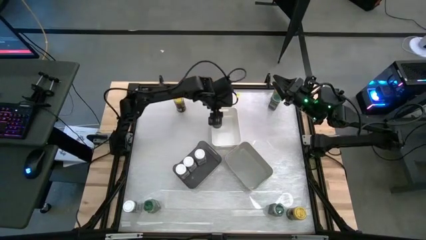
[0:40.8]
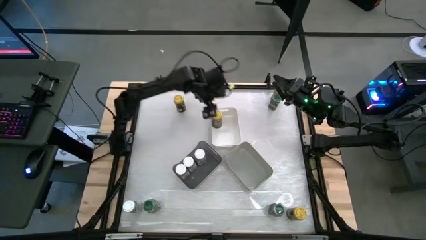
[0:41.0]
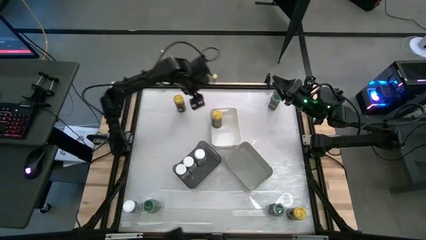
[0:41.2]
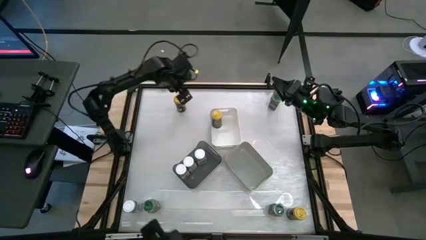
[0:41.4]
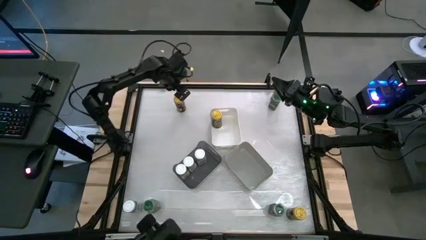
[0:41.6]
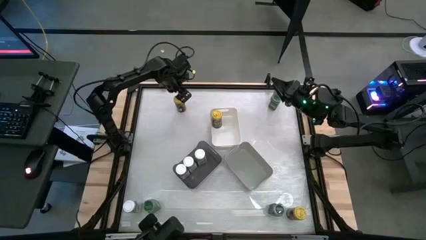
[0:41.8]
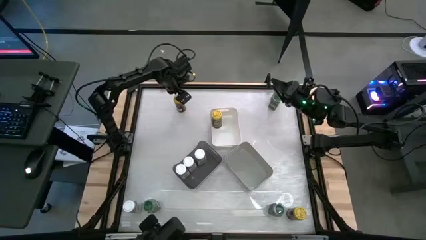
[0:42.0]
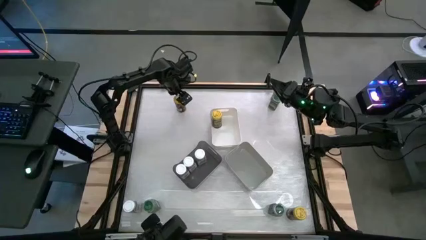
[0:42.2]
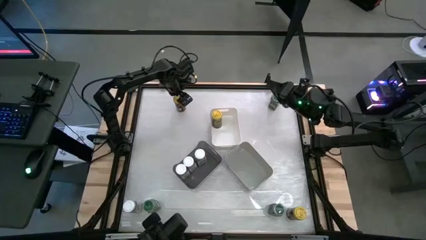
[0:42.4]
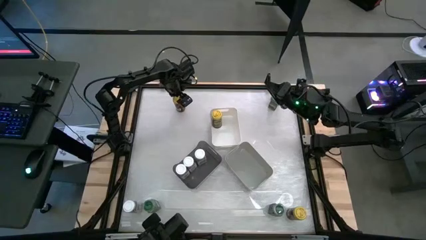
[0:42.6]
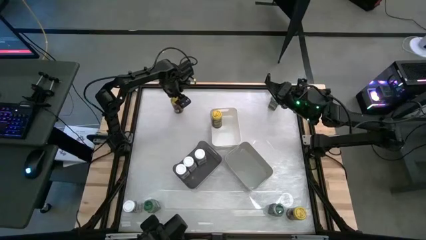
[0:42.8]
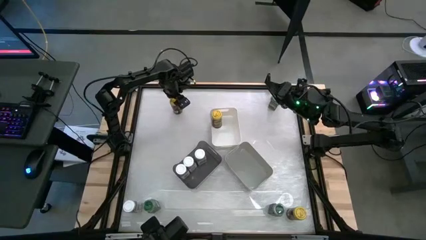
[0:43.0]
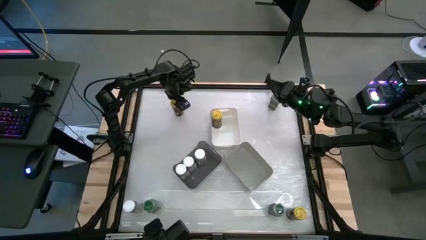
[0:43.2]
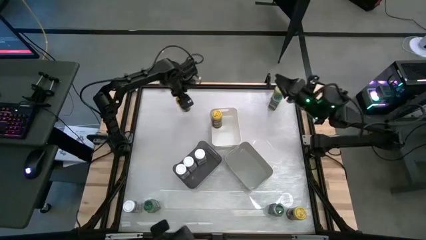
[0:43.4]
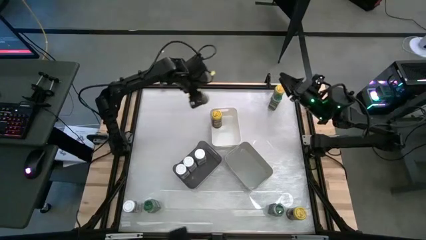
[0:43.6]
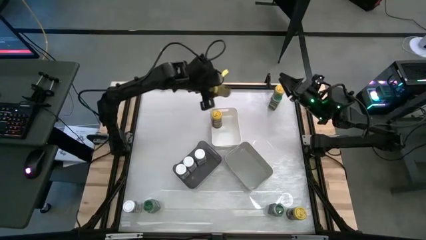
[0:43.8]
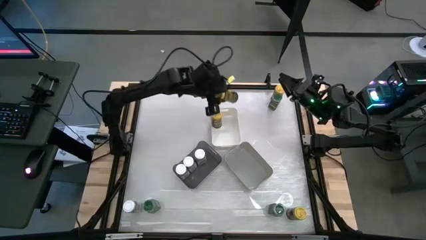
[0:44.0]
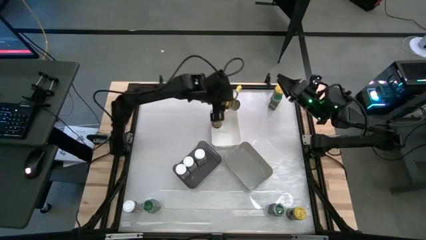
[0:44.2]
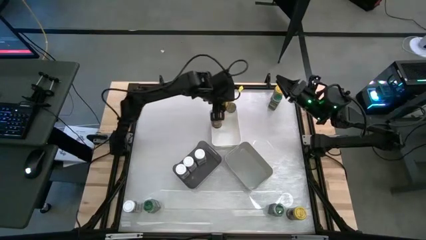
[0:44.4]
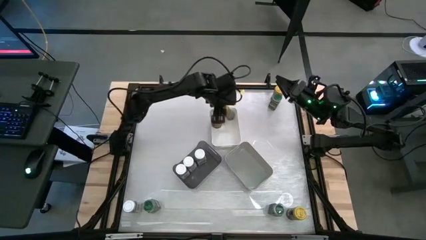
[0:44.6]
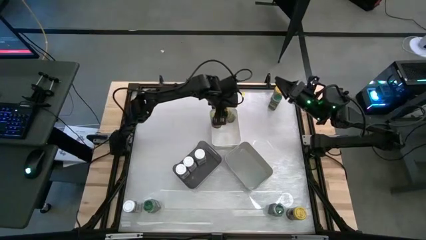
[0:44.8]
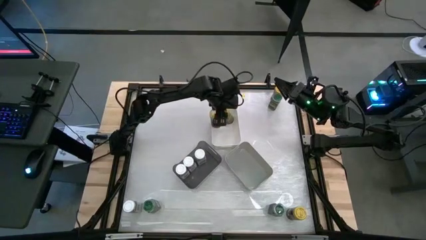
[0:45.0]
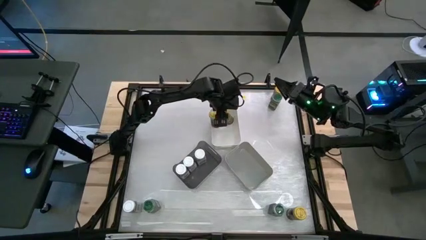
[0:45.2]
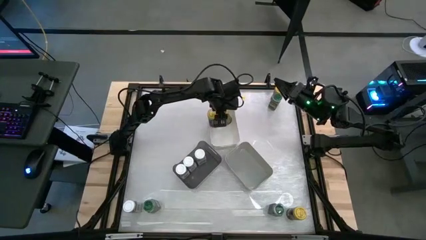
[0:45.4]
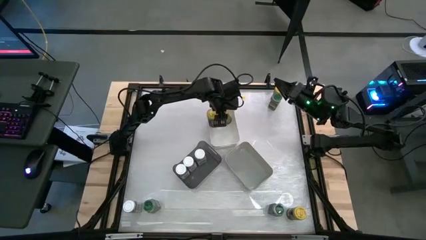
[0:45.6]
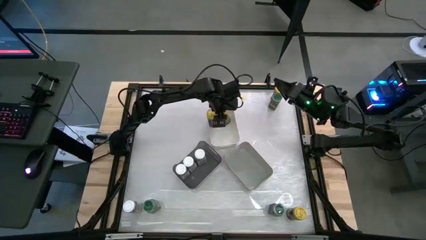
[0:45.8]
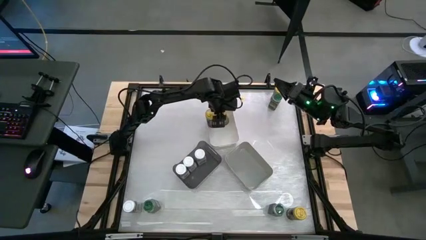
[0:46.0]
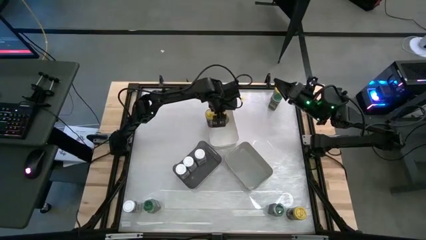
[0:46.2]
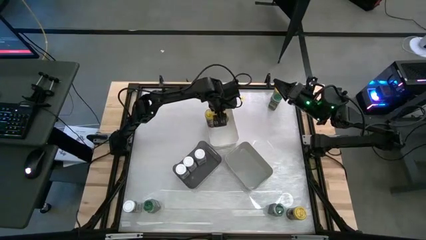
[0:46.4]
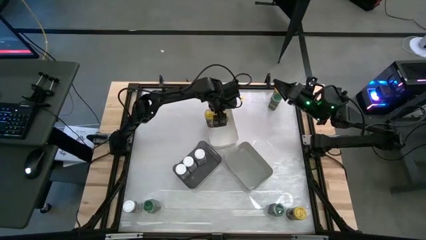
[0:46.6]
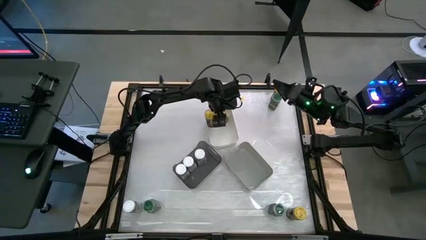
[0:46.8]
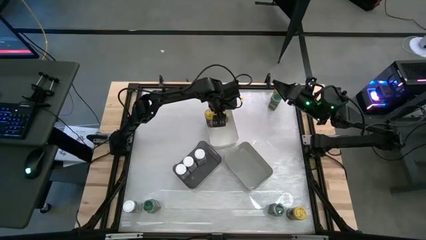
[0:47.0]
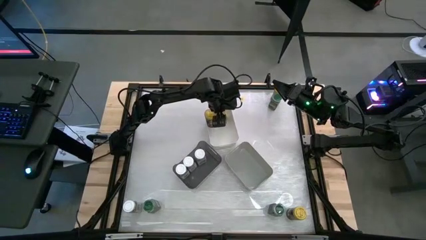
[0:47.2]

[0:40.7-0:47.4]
Task: Sort spices by type
Put the yellow seasoning bottle into the white bin

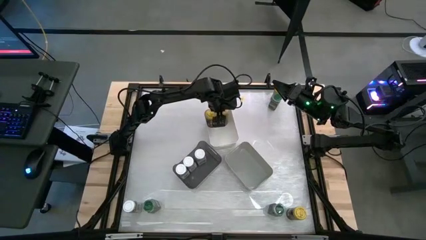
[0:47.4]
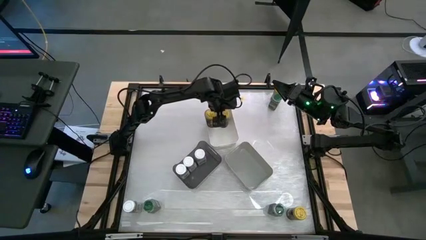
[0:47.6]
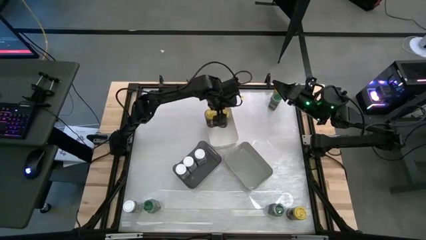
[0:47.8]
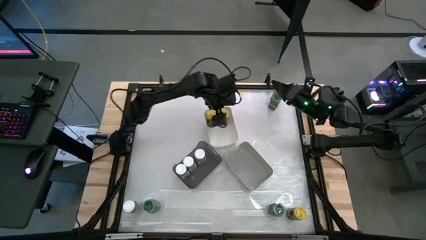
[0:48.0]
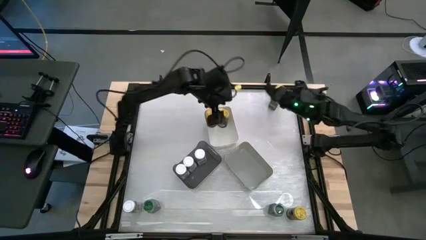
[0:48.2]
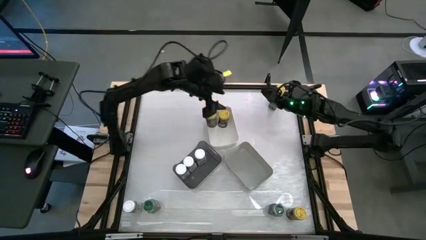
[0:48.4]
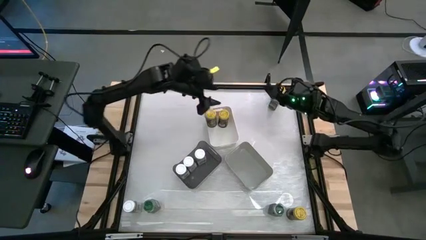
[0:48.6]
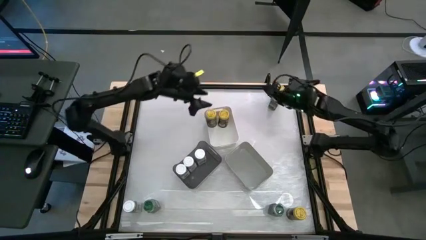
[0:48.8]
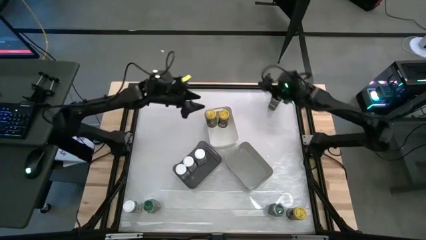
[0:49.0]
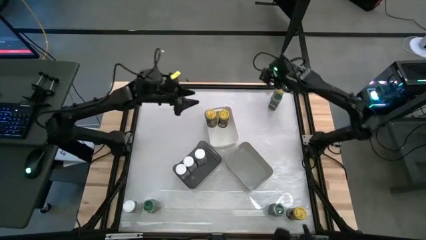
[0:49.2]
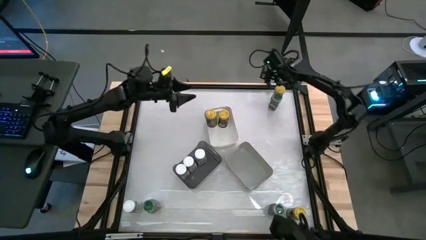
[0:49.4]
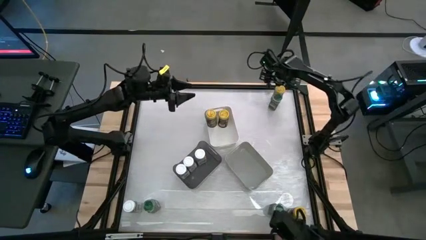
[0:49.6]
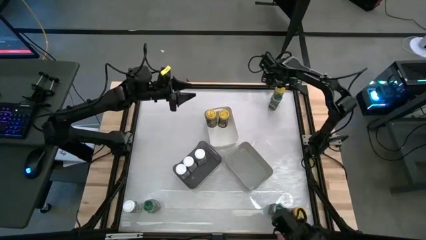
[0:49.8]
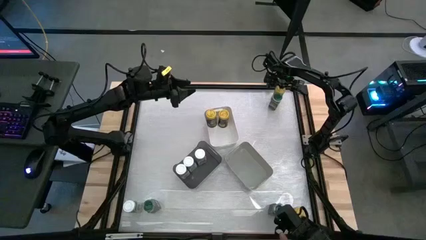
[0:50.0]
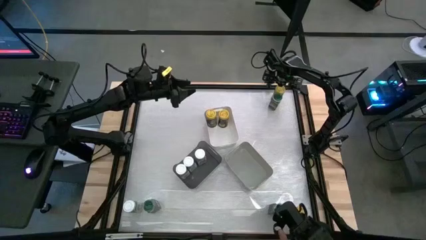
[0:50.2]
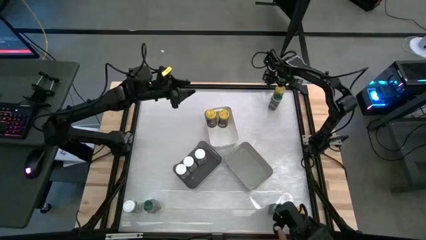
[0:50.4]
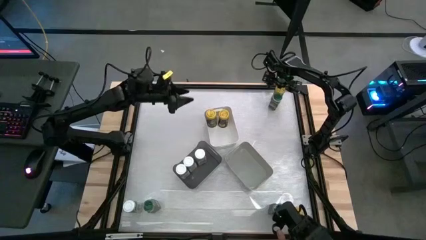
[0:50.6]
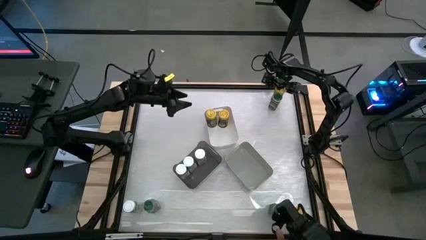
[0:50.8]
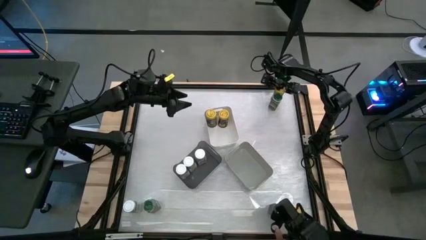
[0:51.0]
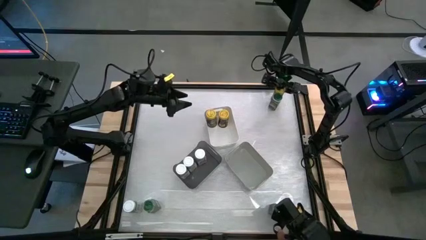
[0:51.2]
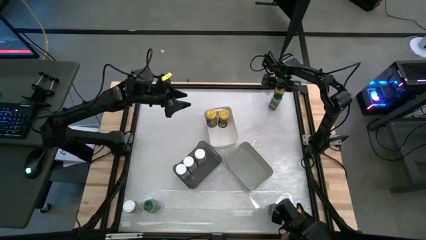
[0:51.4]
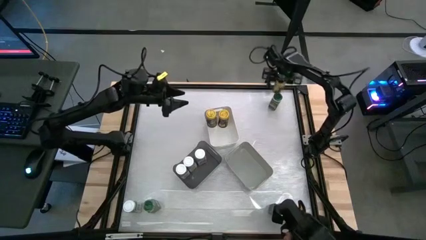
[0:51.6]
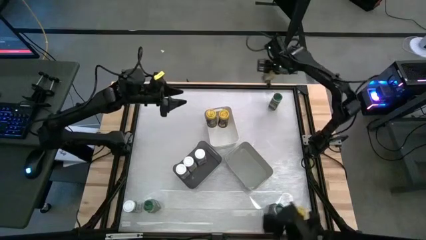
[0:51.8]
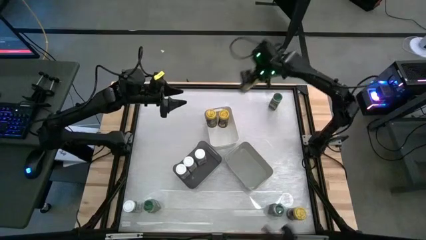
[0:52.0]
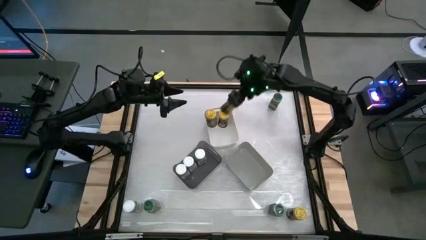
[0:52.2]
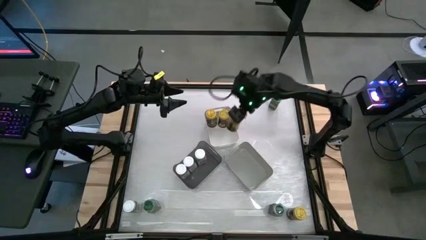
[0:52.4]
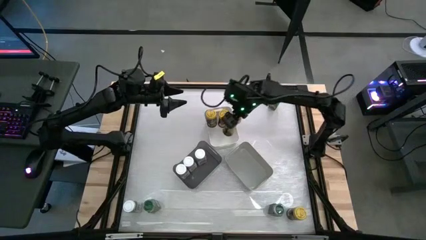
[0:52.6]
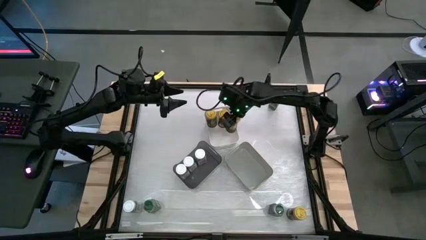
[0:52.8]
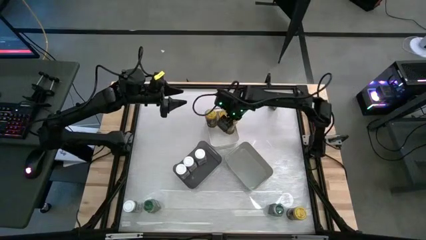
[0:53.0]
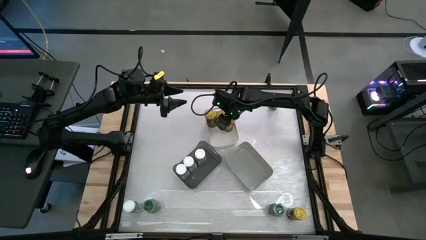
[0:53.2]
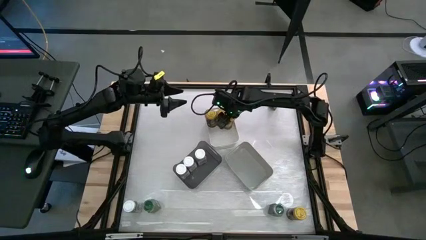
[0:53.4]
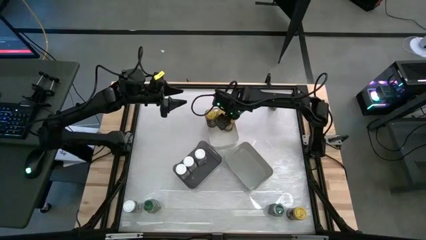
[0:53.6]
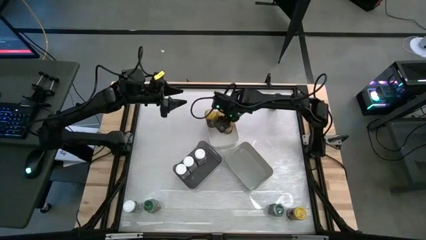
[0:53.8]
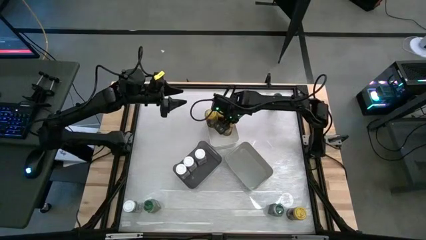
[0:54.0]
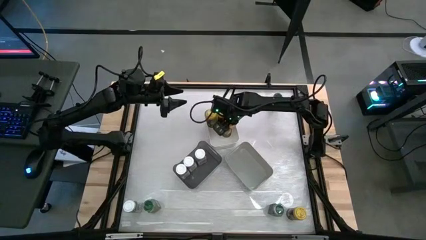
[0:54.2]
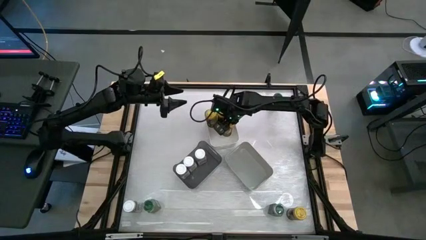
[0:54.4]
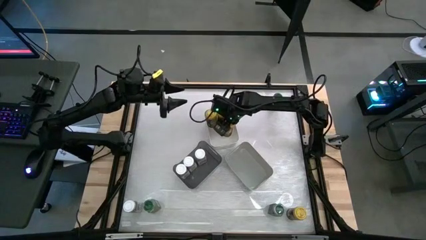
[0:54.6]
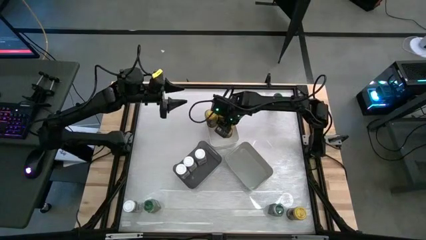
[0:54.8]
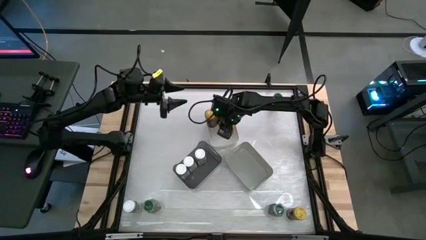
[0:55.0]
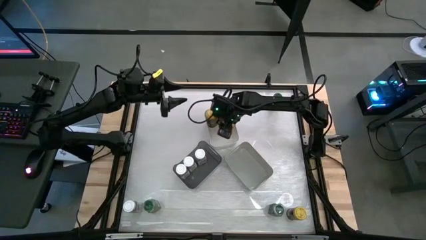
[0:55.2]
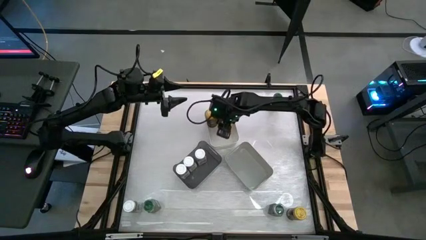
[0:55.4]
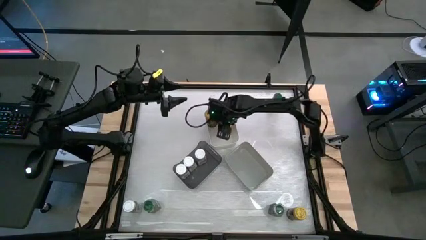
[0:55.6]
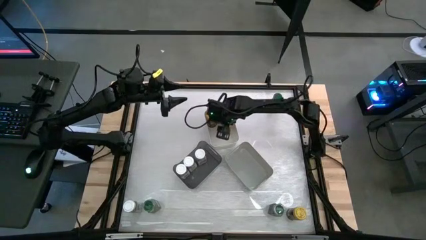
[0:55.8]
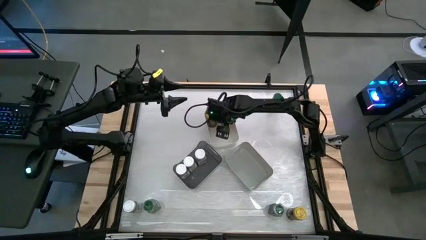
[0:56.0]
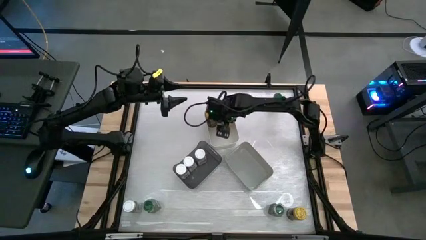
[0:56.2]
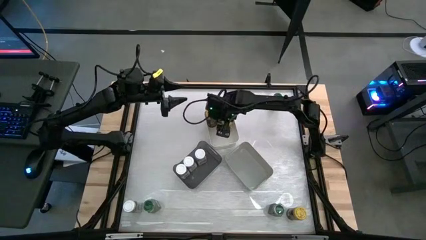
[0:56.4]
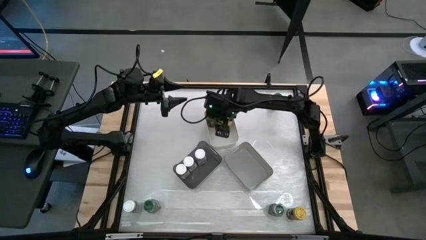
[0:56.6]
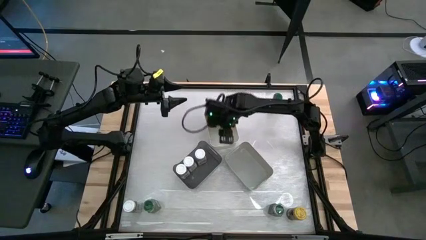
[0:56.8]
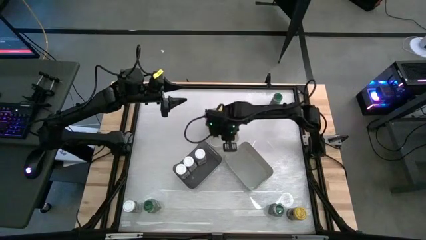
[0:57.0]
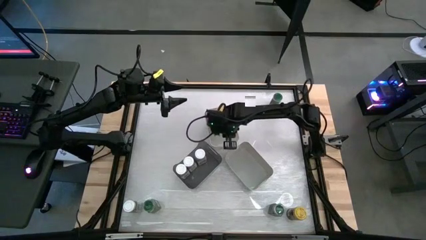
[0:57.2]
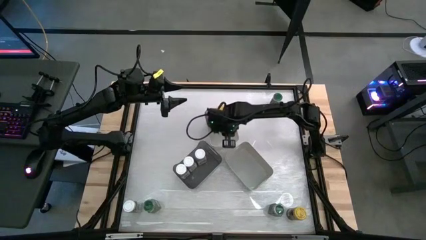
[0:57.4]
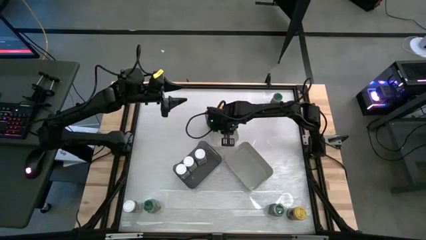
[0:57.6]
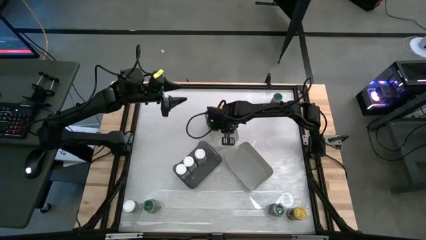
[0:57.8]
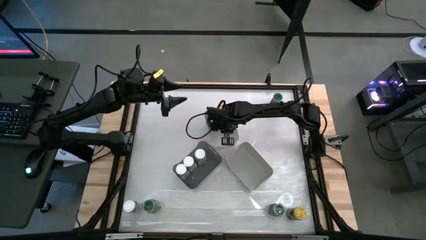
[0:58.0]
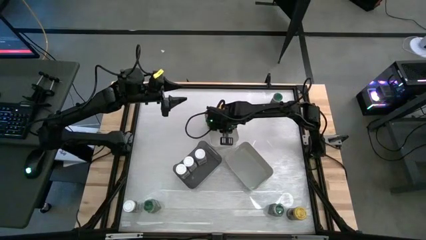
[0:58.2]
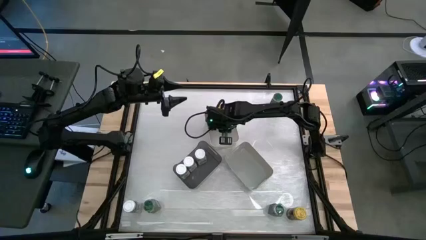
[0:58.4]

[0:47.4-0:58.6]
Put the yellow seasoning bottle into the white bin
